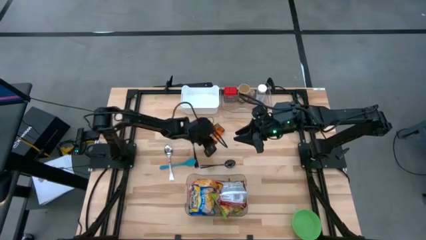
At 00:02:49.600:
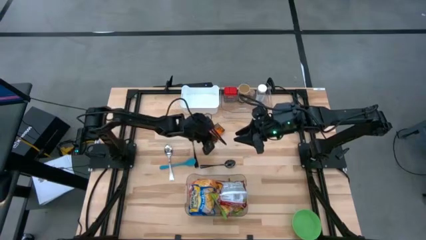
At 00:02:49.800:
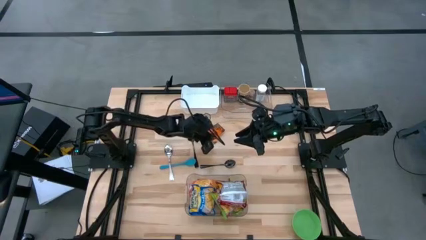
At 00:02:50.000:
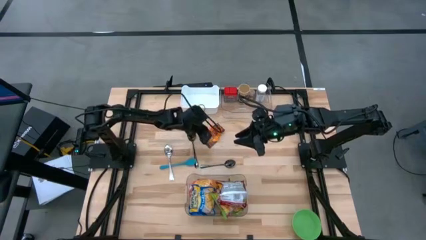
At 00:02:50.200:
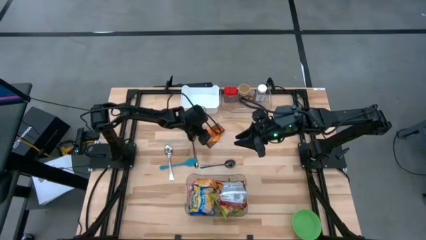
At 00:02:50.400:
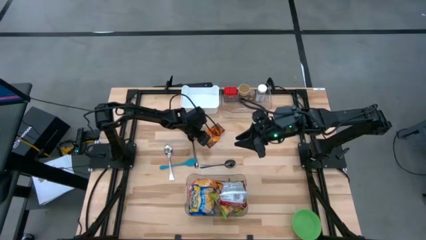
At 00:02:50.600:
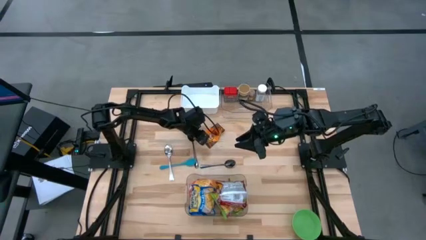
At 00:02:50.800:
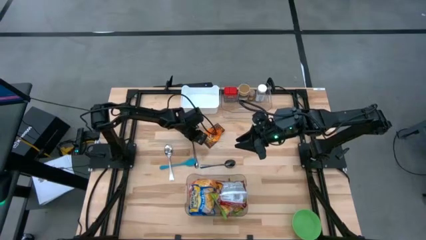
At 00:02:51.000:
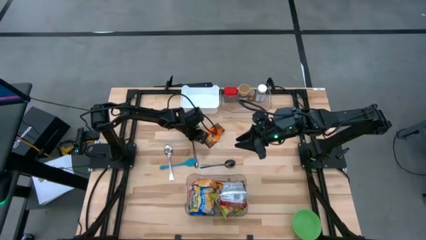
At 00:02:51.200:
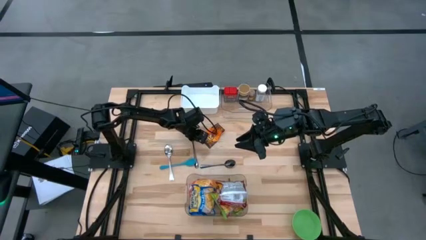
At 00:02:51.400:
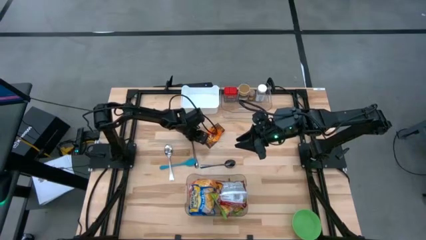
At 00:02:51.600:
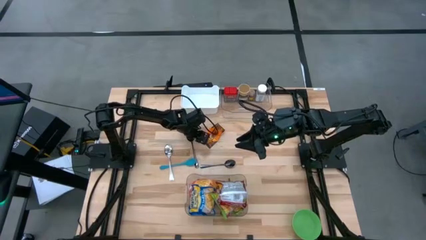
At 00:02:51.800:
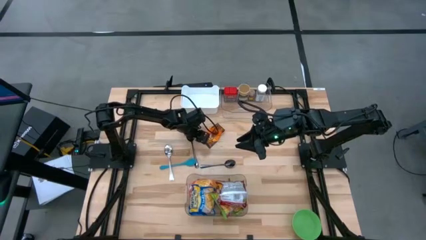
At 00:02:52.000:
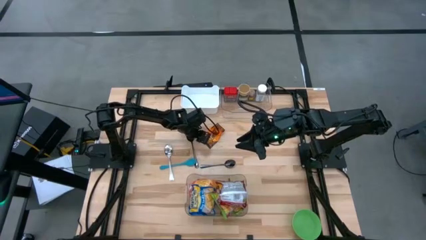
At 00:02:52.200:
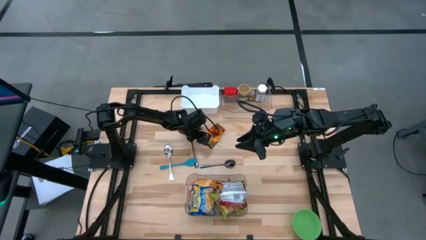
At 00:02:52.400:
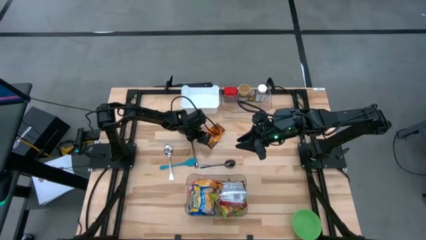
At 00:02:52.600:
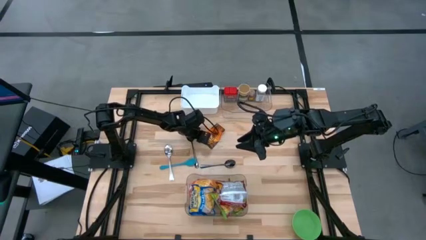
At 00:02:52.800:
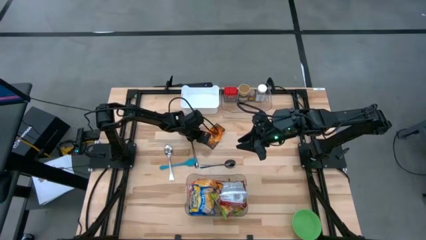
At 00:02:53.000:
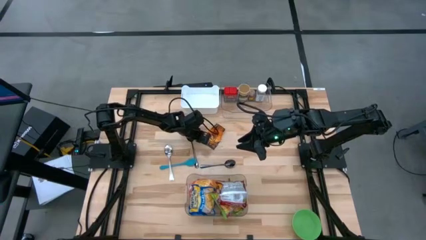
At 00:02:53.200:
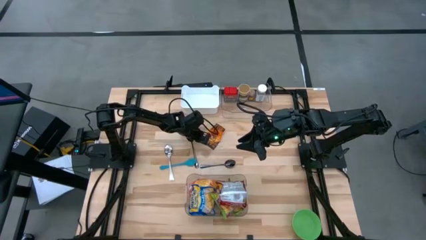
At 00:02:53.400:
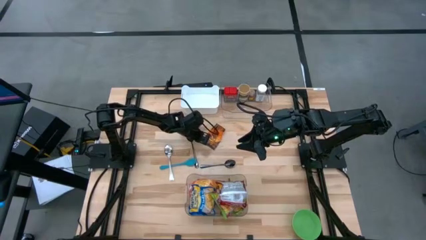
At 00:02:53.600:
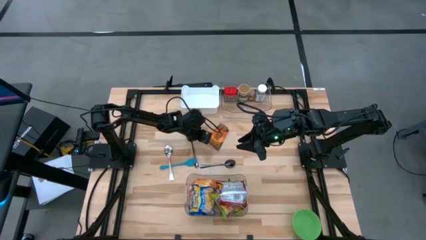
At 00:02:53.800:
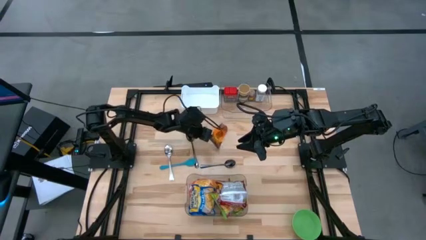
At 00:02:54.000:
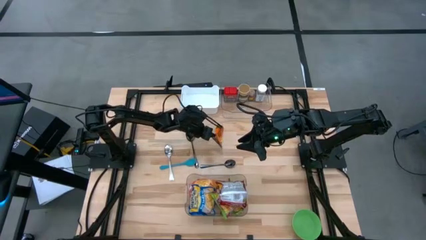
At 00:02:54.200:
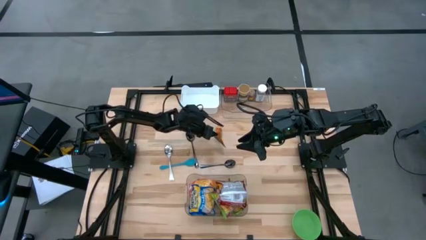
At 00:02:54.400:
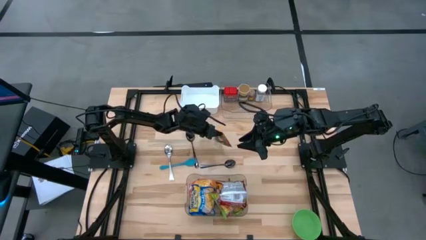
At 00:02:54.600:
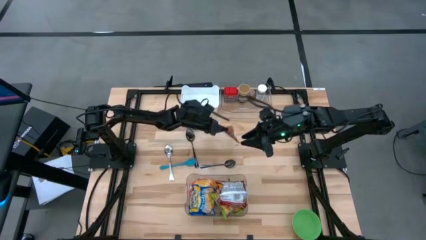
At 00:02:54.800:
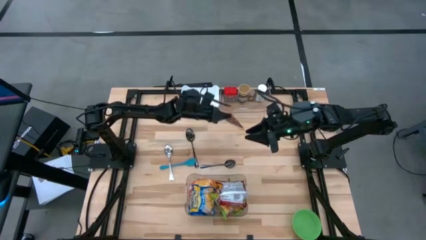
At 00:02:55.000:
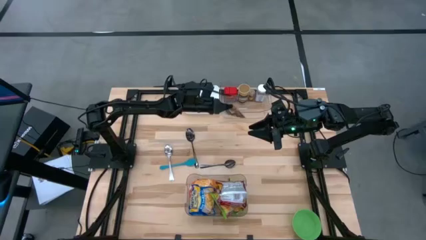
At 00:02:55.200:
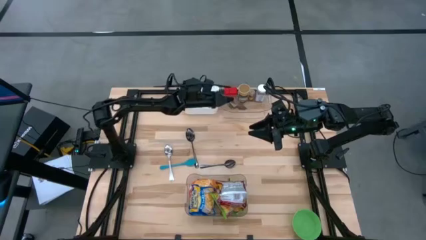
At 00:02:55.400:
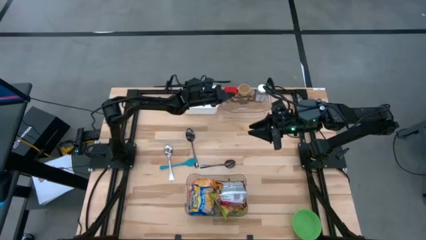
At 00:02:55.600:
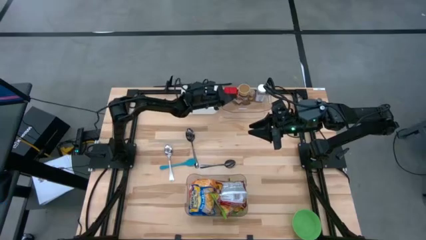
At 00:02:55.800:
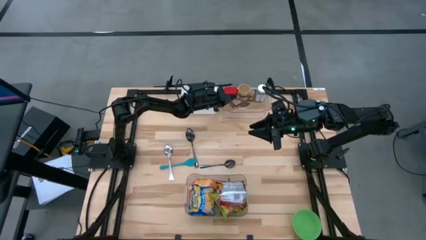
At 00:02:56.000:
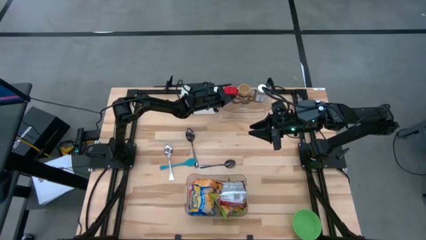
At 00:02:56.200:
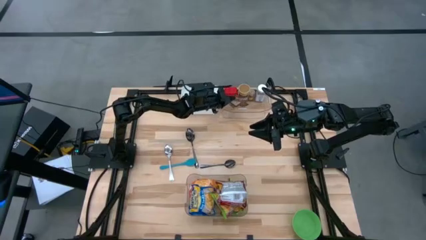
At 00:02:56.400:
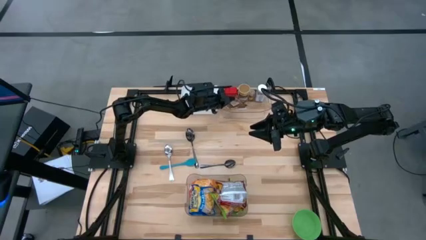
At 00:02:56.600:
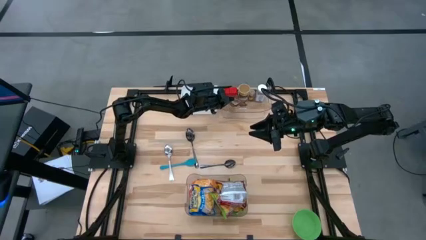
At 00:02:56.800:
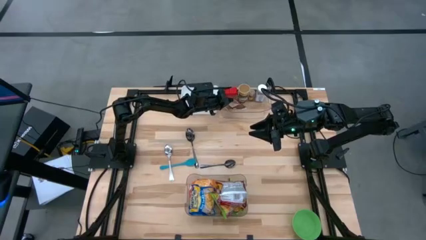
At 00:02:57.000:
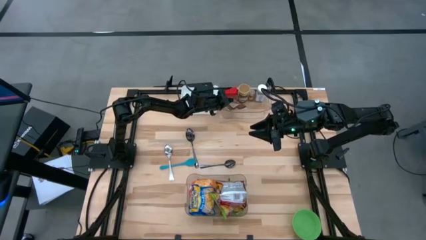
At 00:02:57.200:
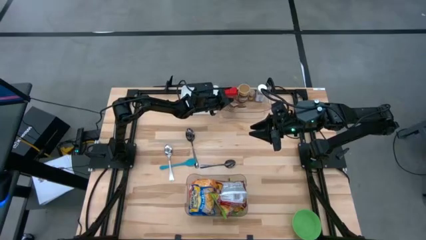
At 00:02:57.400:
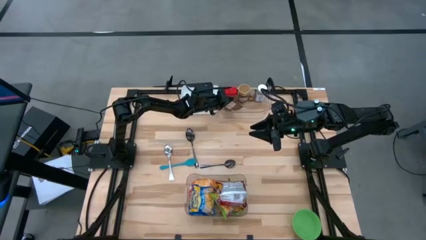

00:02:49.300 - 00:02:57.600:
Task: Pick & Place Food Item
Put the orange seasoning into the top transparent bin

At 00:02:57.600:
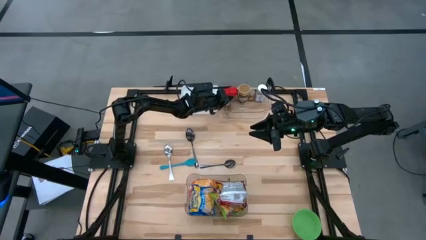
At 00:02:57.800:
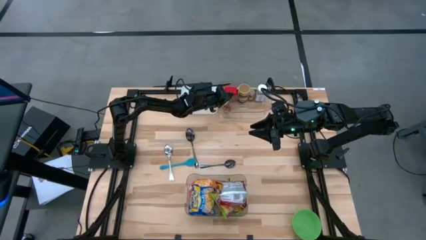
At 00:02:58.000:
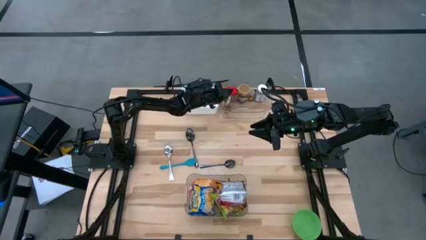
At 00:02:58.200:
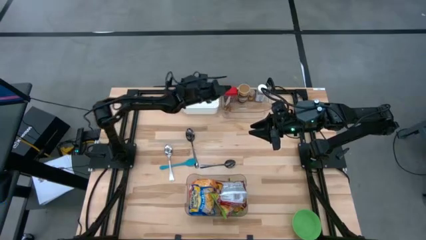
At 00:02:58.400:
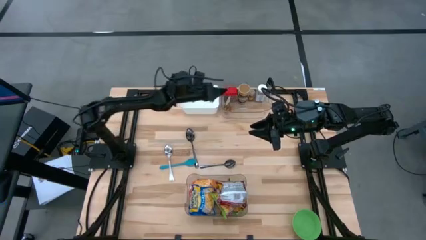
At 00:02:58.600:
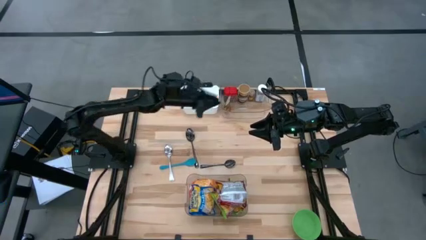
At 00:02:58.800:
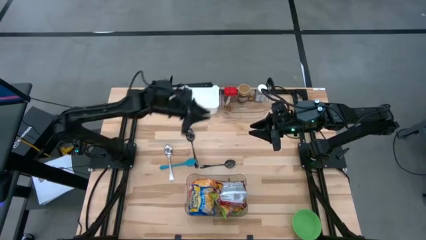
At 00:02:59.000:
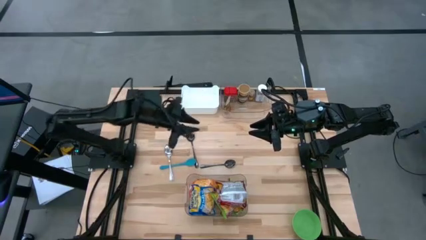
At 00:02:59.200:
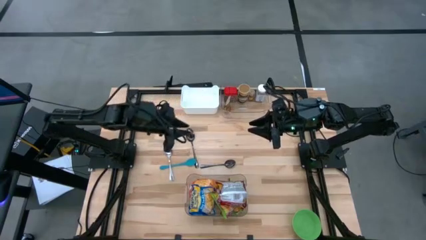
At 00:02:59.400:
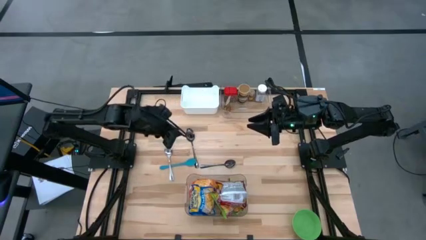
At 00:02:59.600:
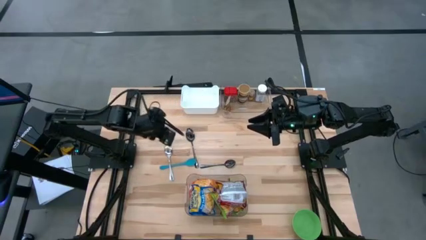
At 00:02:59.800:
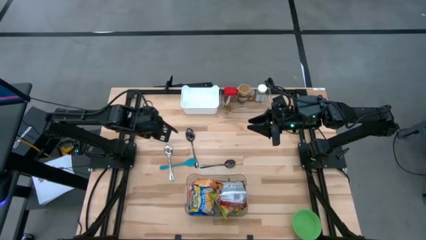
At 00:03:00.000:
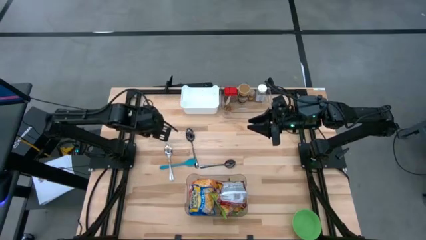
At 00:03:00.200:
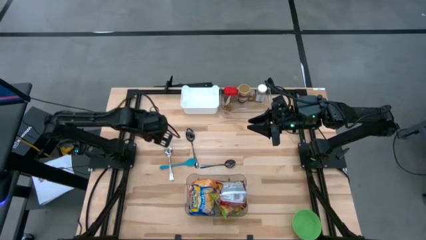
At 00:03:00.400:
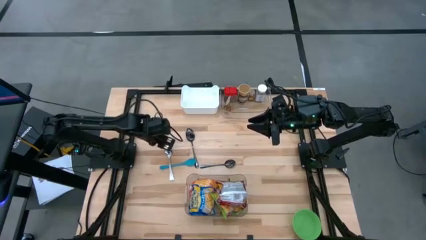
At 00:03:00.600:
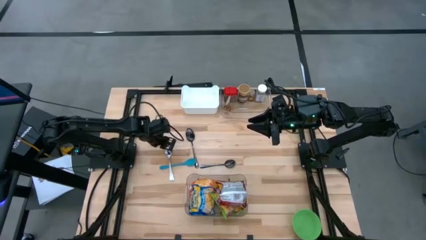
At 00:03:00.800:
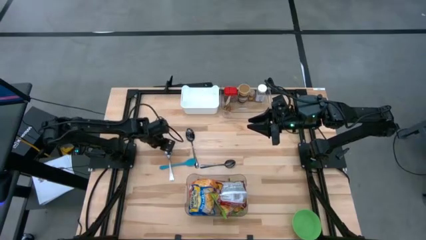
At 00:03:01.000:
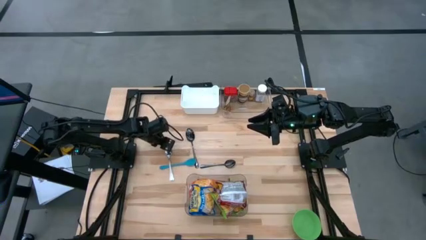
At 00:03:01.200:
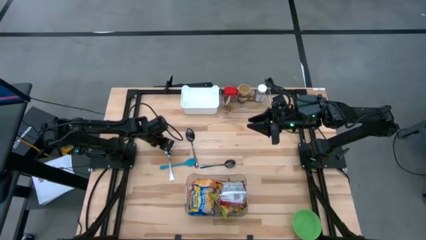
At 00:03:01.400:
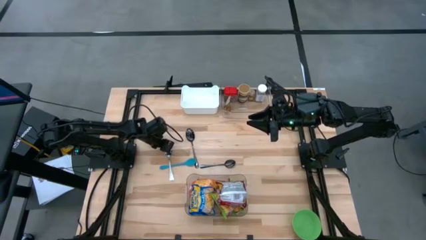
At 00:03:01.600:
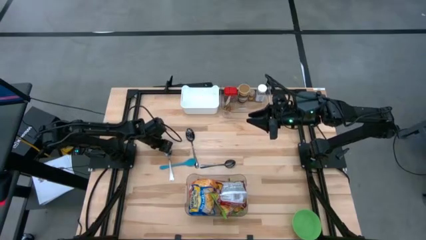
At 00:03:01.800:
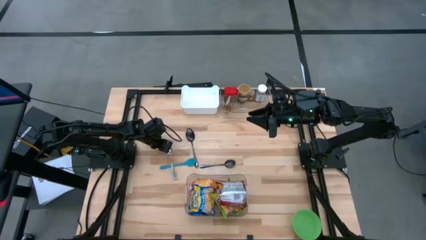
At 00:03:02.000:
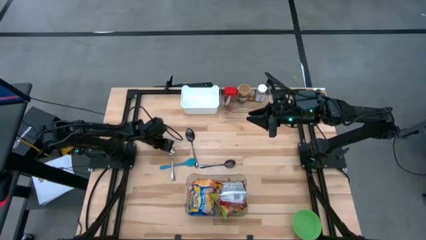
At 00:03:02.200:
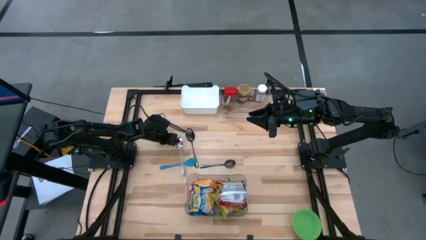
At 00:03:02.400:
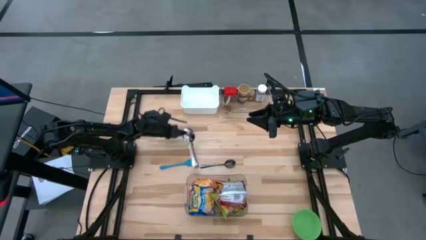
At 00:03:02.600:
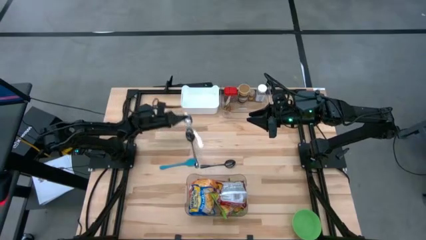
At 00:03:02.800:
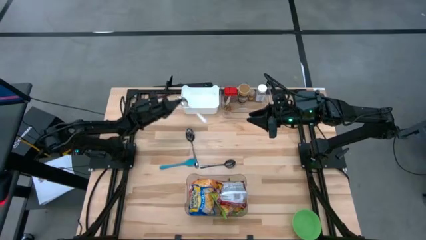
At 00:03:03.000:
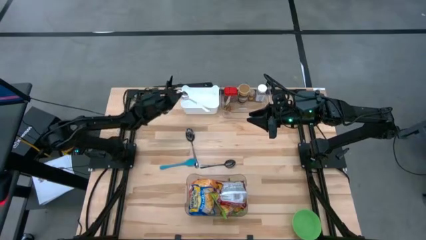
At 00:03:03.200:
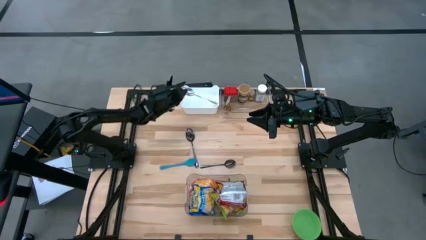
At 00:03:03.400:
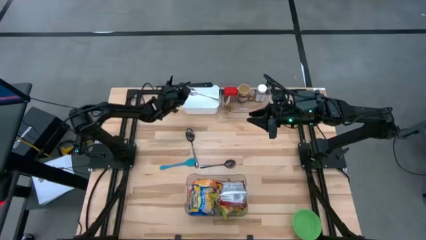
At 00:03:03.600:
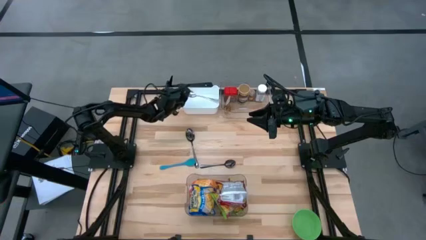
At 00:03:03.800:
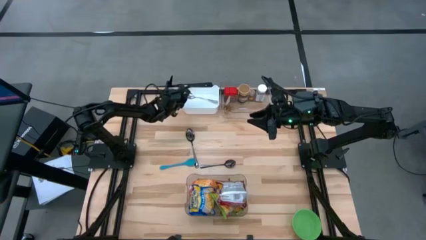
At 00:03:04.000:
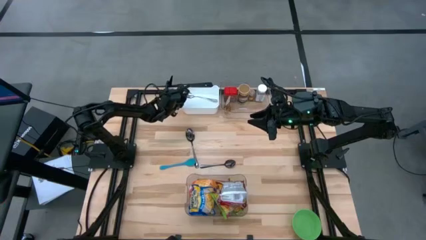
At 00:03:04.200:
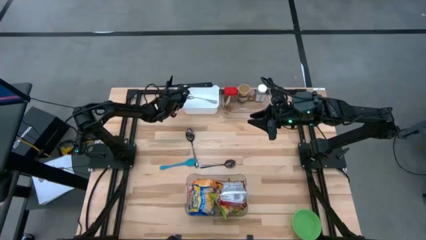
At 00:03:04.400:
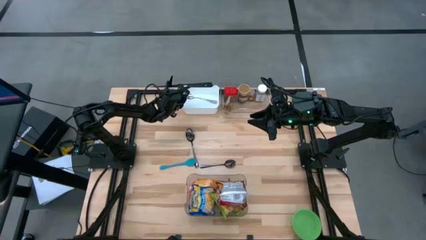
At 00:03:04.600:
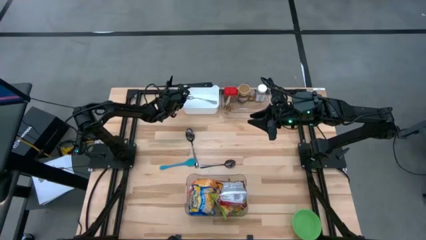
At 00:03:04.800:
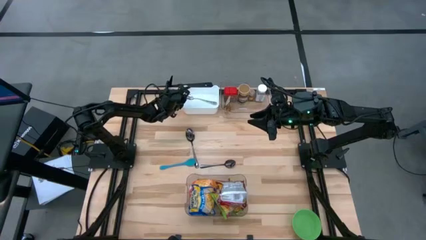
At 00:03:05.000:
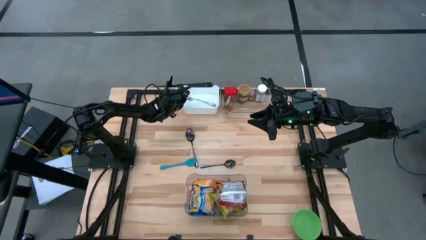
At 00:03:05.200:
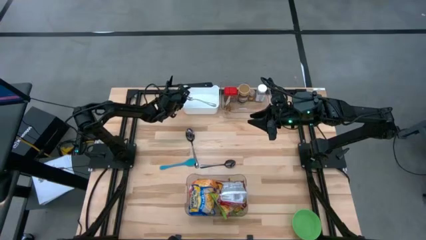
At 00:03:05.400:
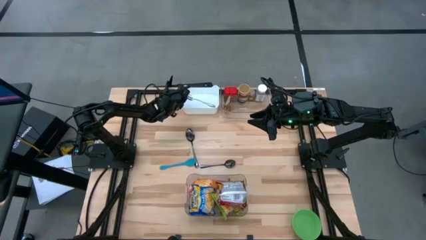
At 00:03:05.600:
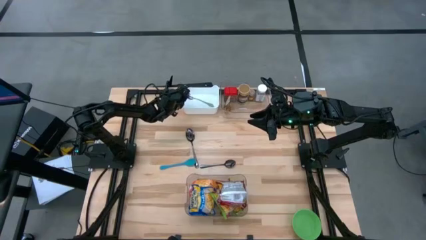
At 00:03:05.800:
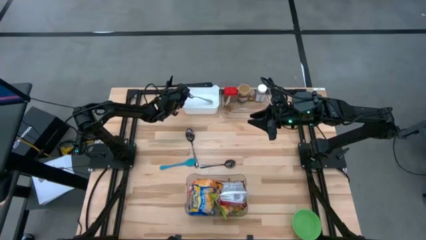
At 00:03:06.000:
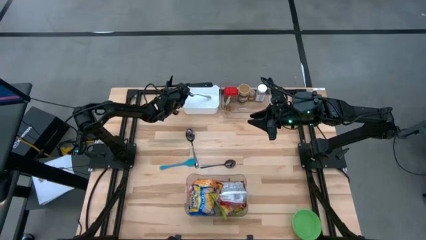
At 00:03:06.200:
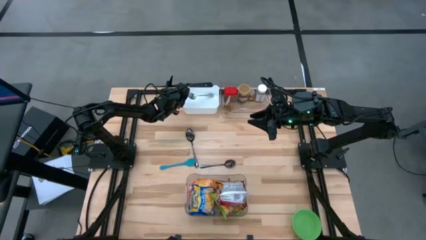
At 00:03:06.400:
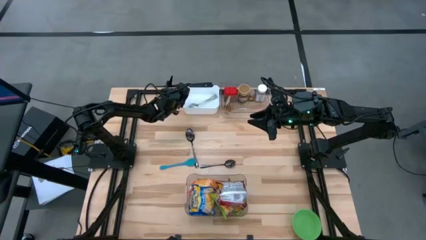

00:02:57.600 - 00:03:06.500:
Put the silver spoon into the white bin
